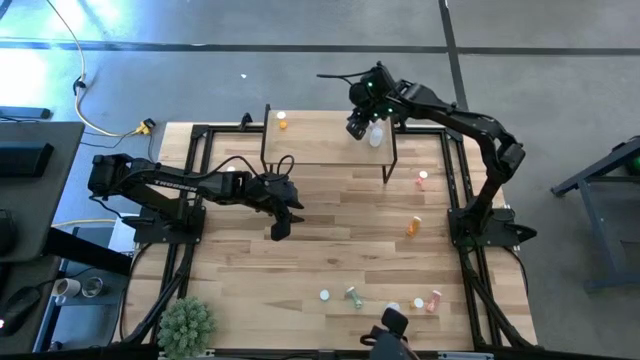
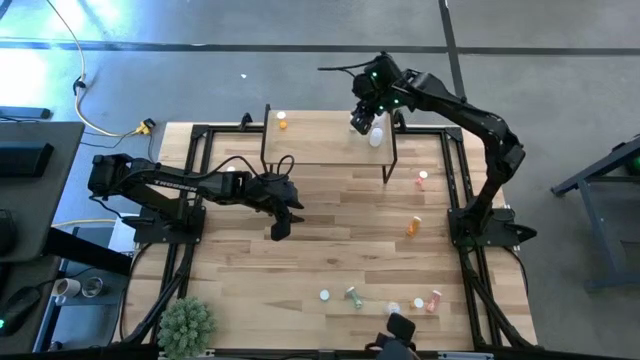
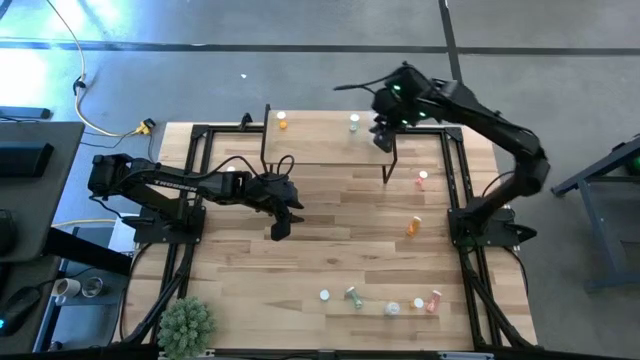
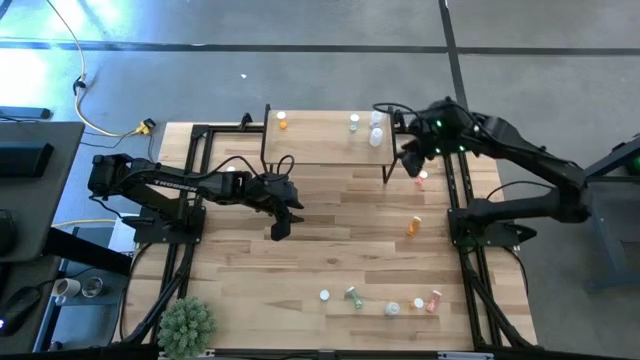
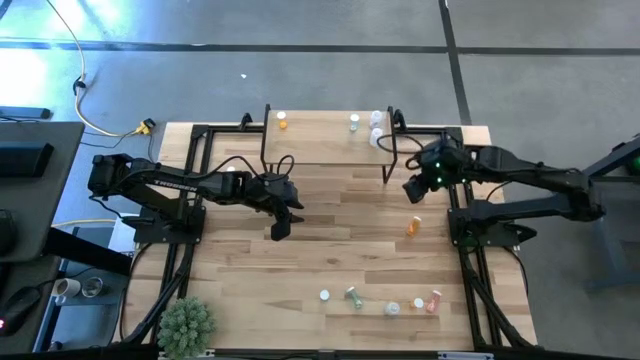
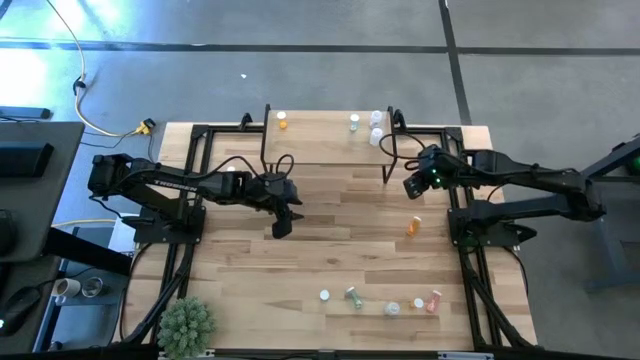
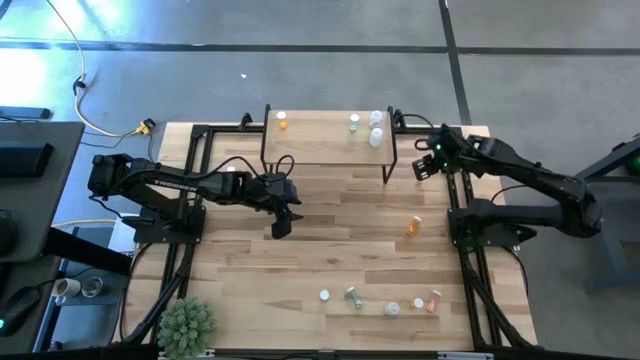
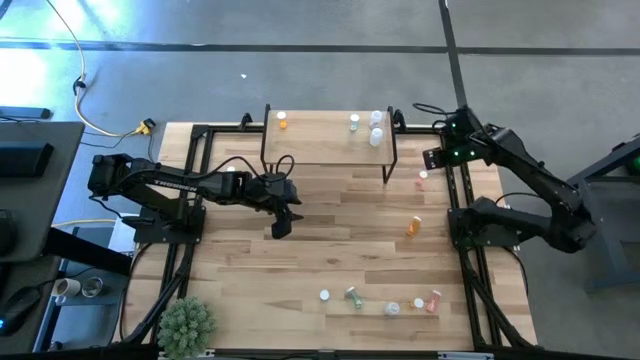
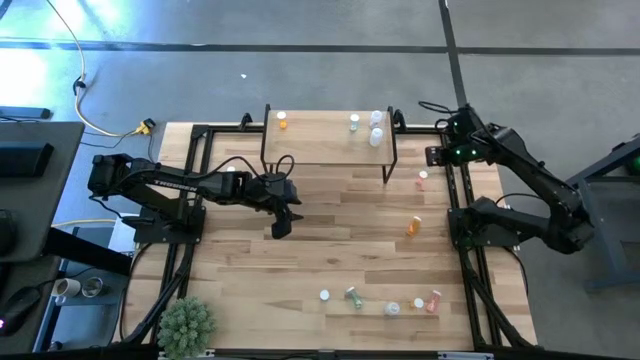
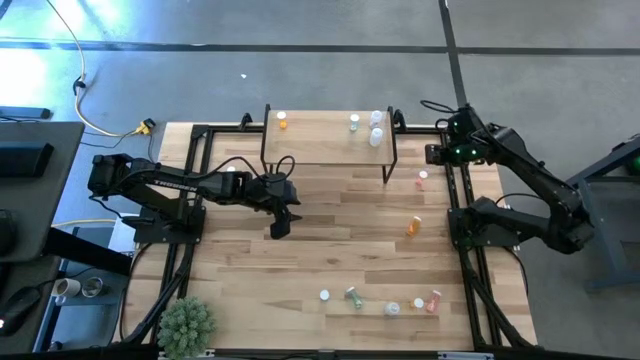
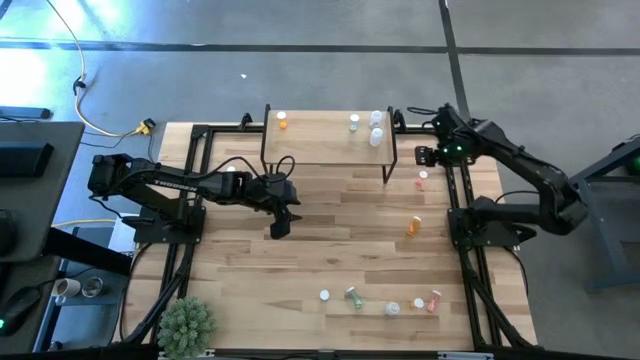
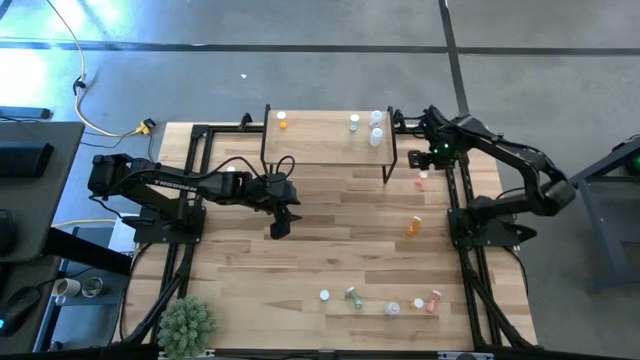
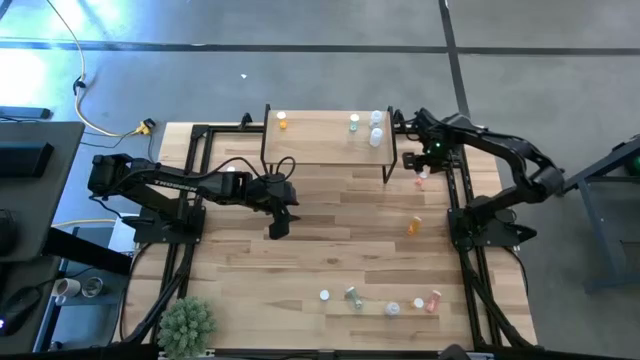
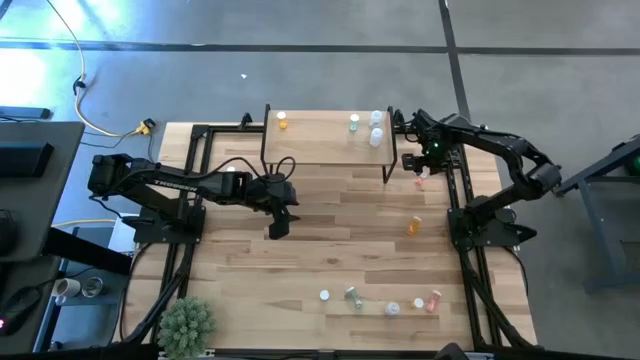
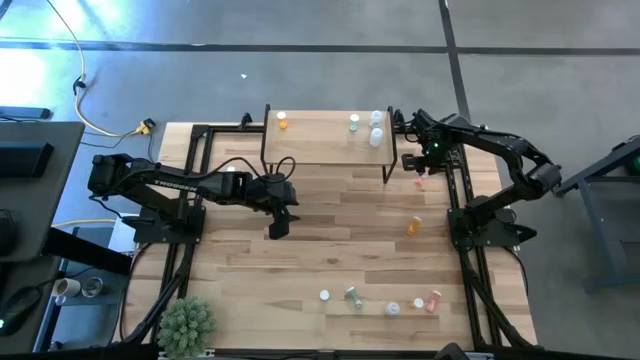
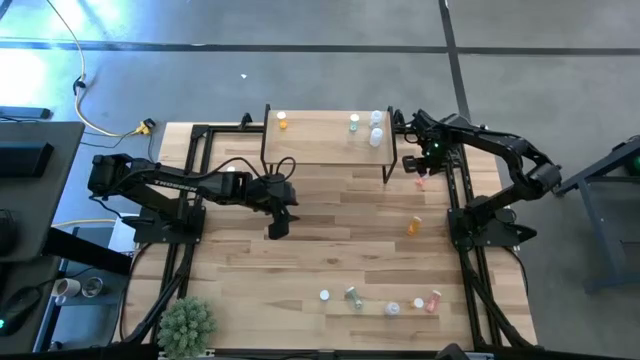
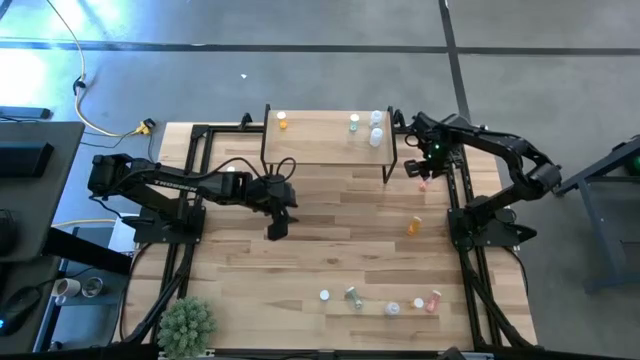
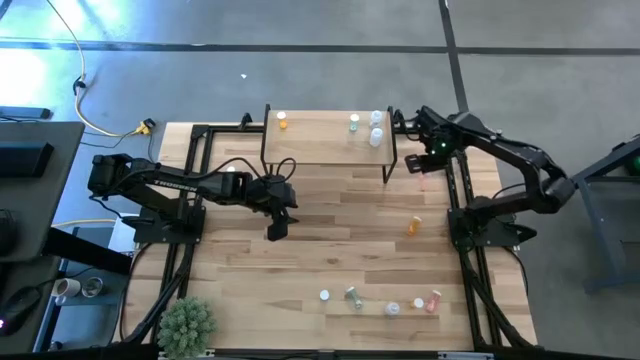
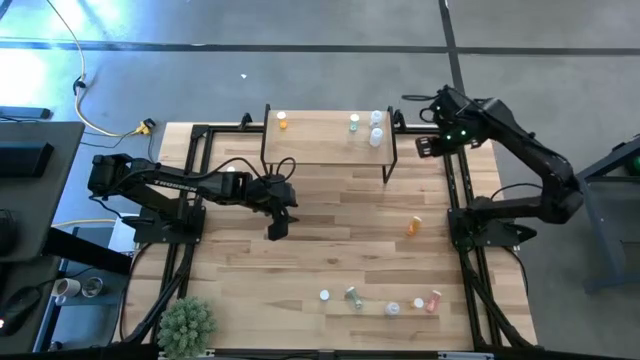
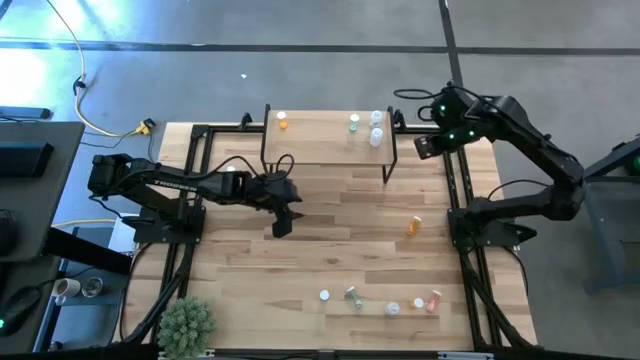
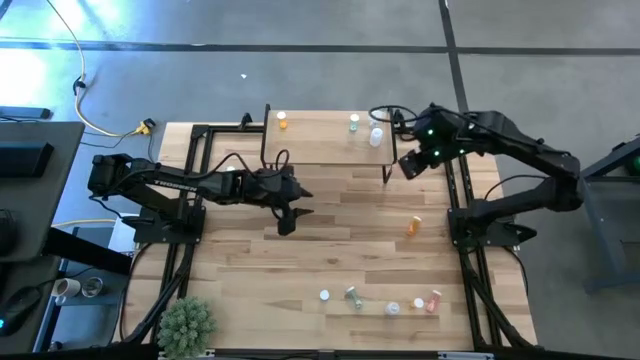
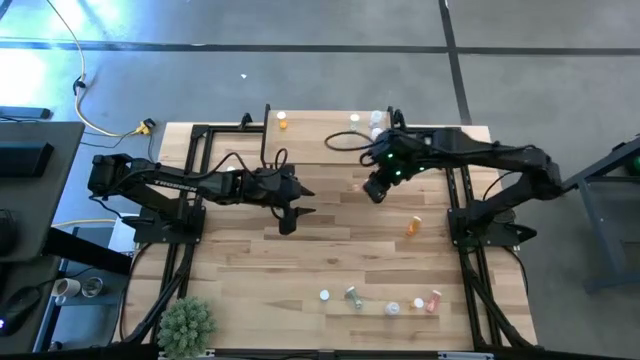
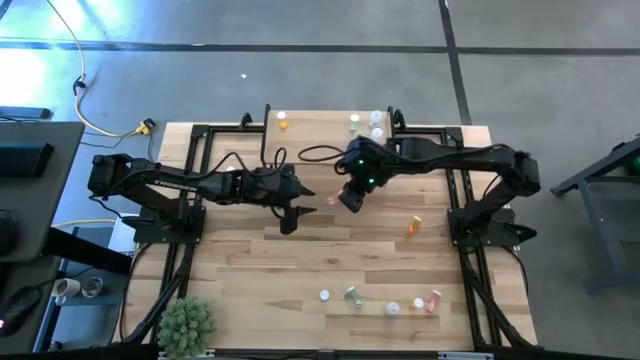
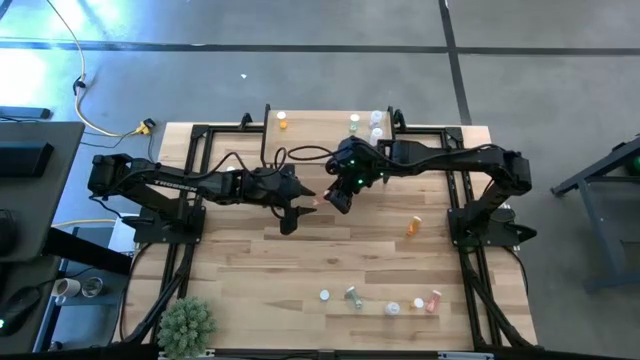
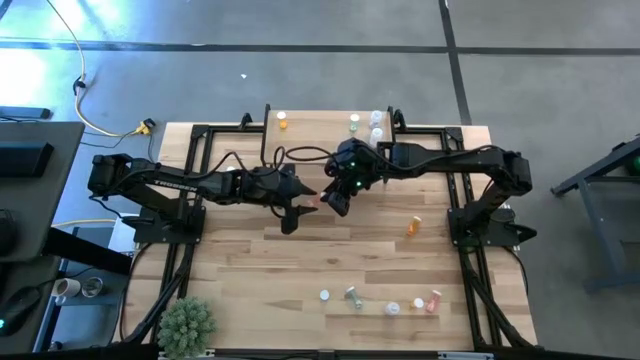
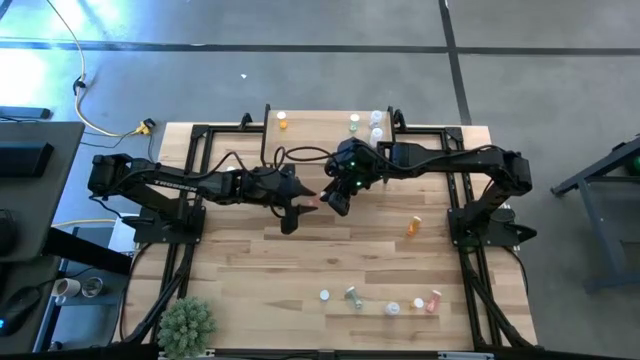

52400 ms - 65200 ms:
Task: Pick and place medicine bottles onto shelf by color
Put the top right pink pill bottle on the shelf

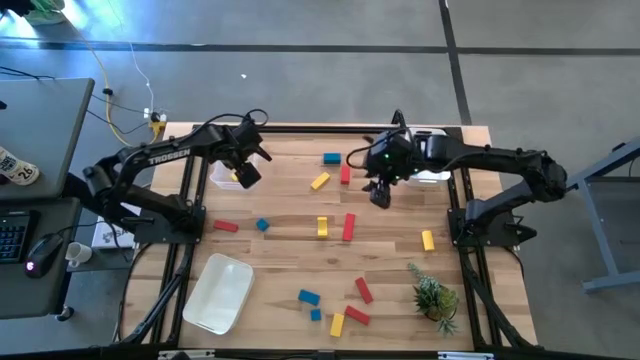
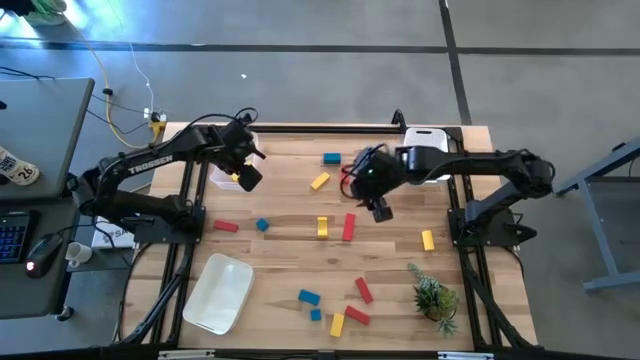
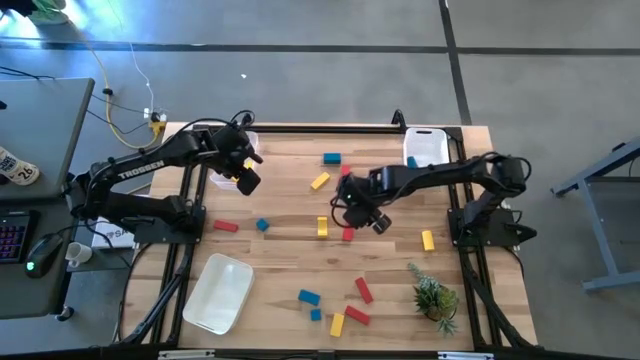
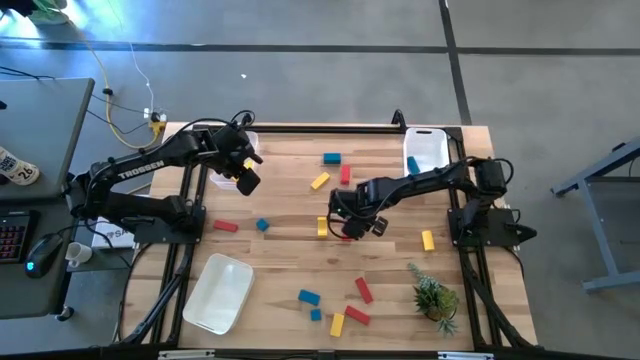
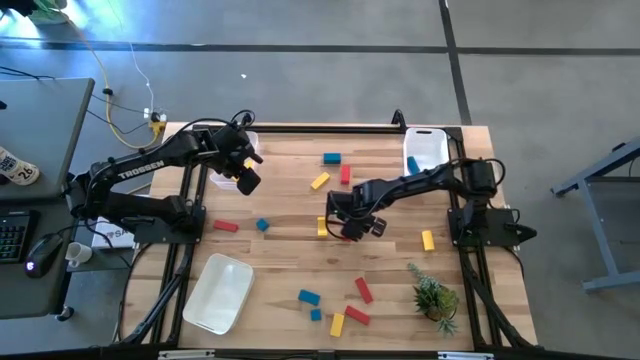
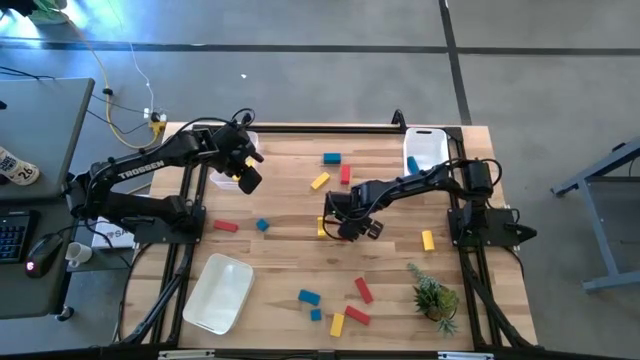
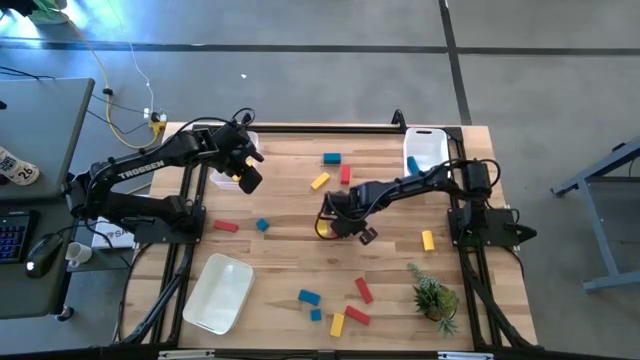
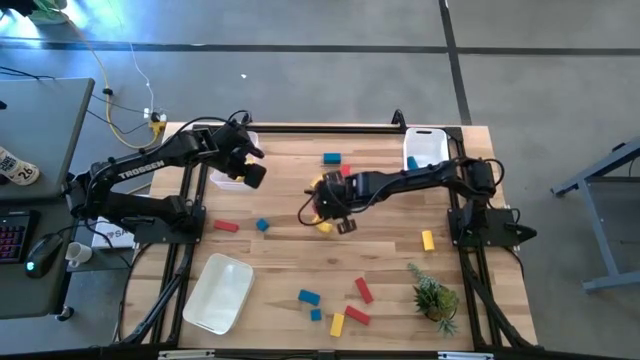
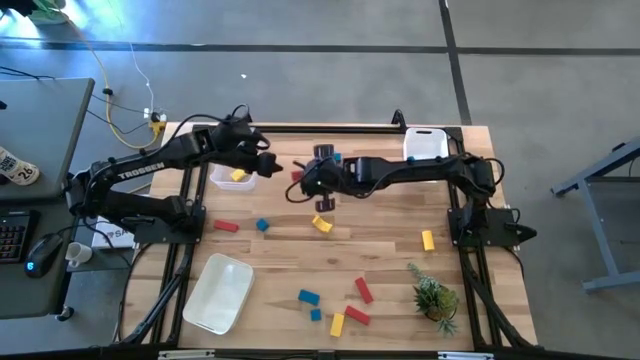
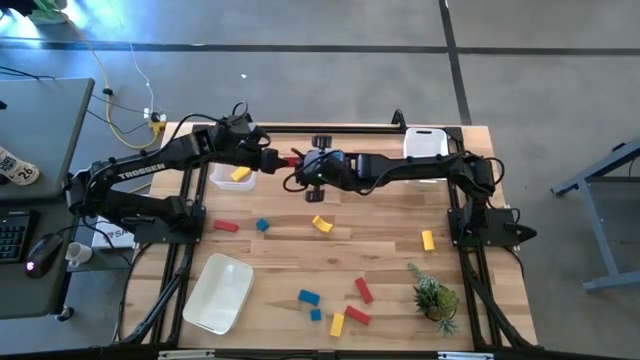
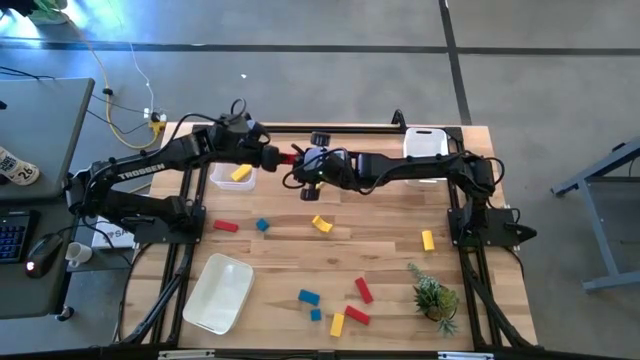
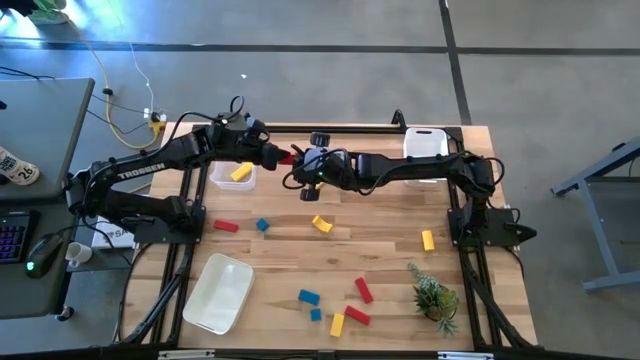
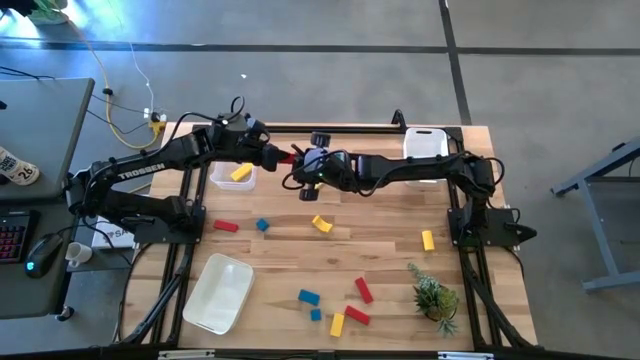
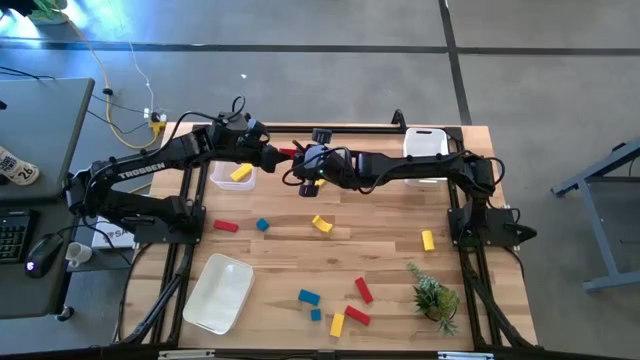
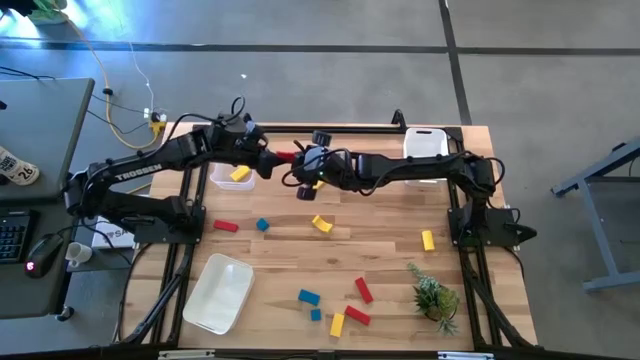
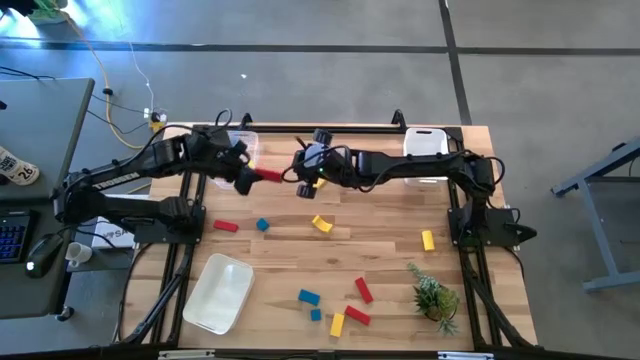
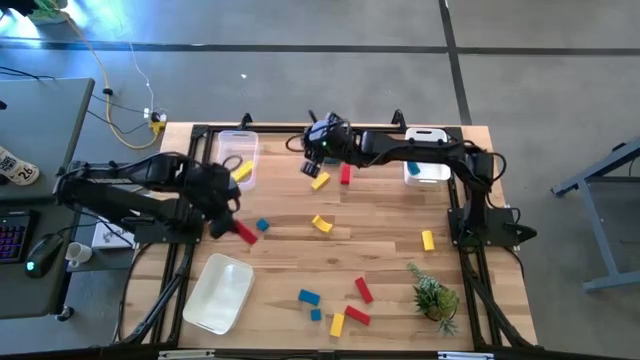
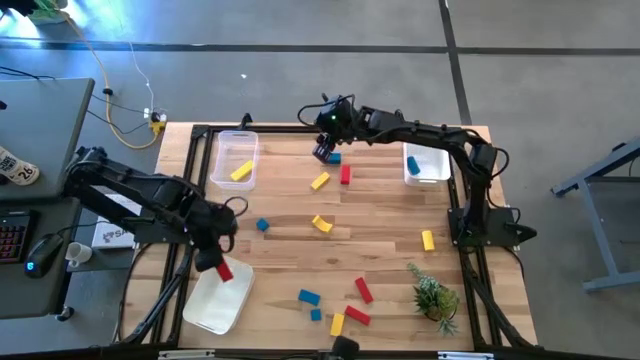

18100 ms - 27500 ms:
Task: Sort & place blocks by color
Put the red block into the bottom white bin
